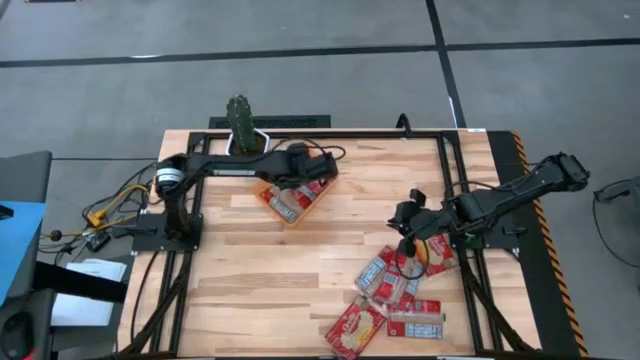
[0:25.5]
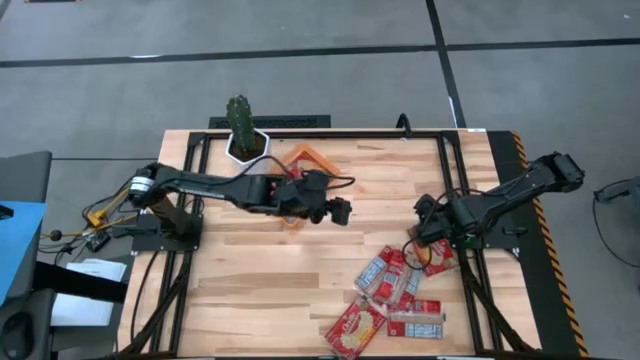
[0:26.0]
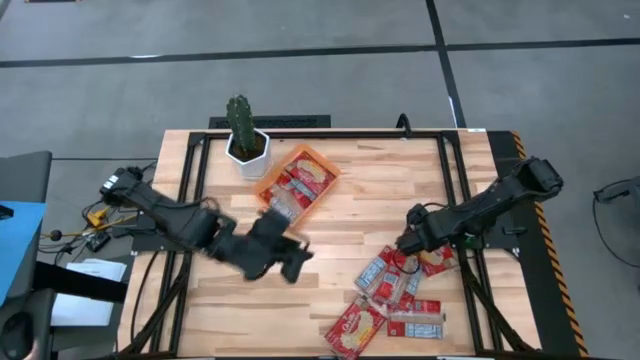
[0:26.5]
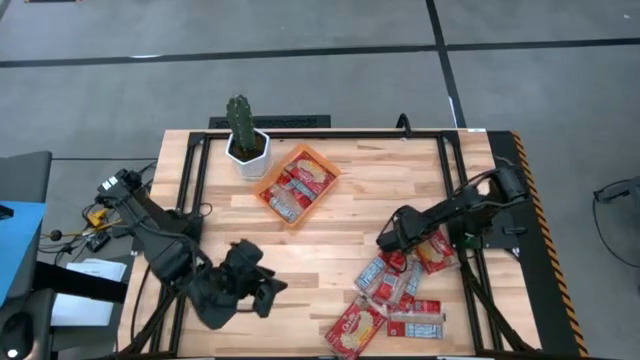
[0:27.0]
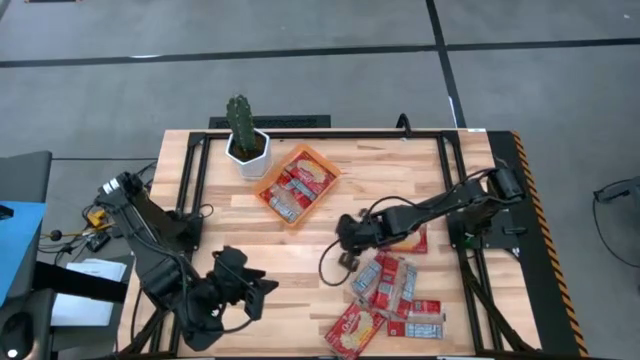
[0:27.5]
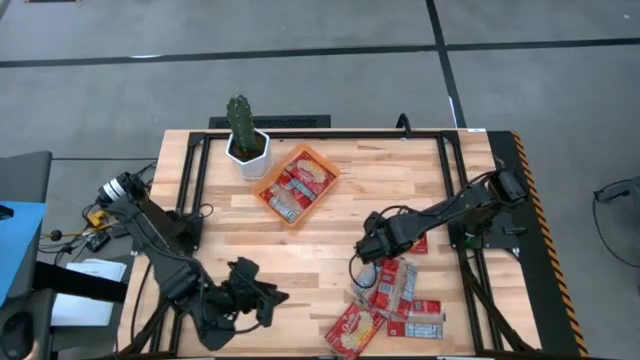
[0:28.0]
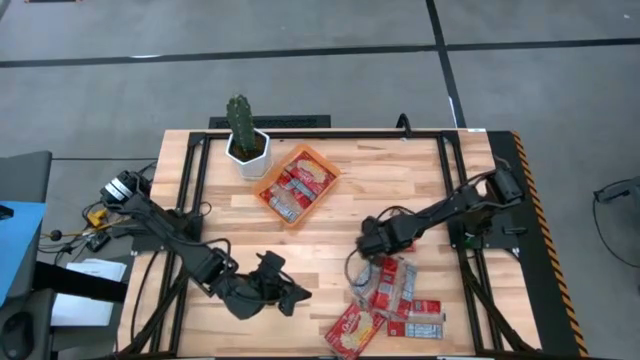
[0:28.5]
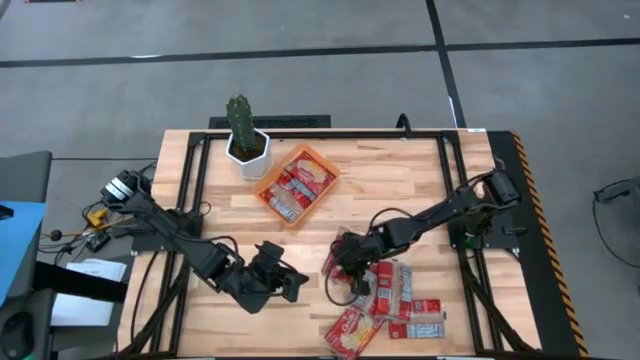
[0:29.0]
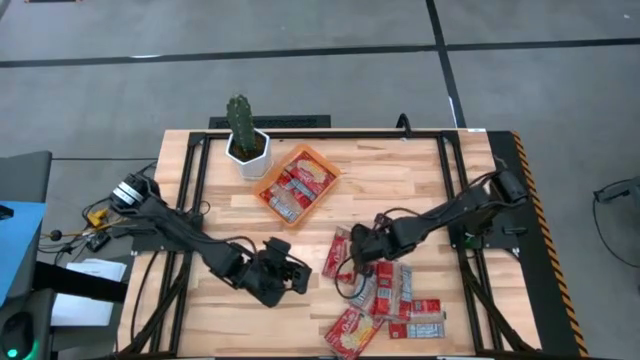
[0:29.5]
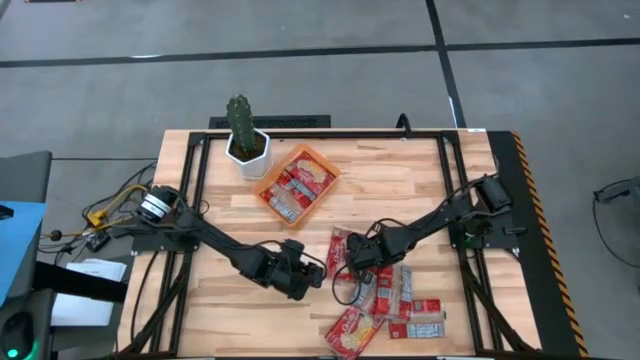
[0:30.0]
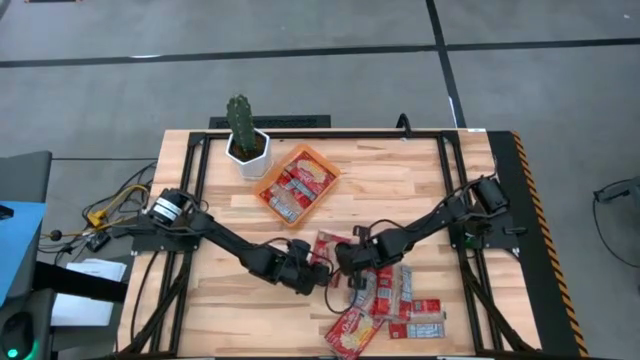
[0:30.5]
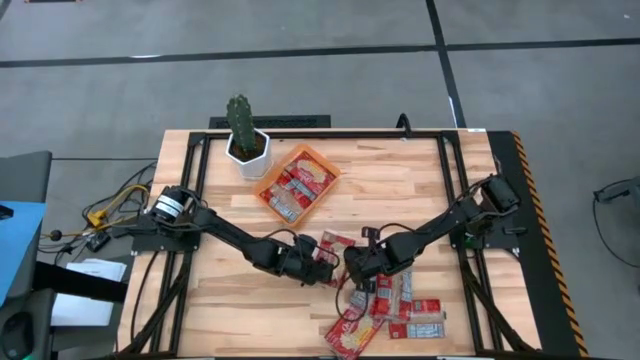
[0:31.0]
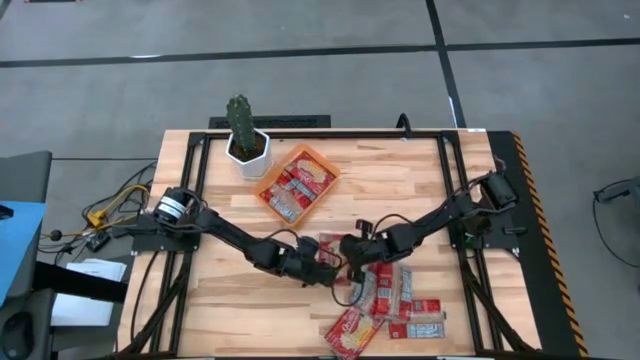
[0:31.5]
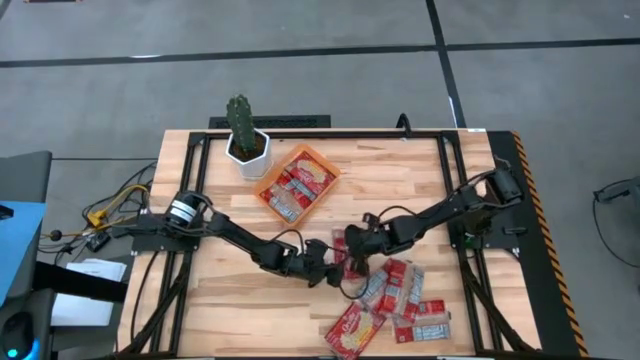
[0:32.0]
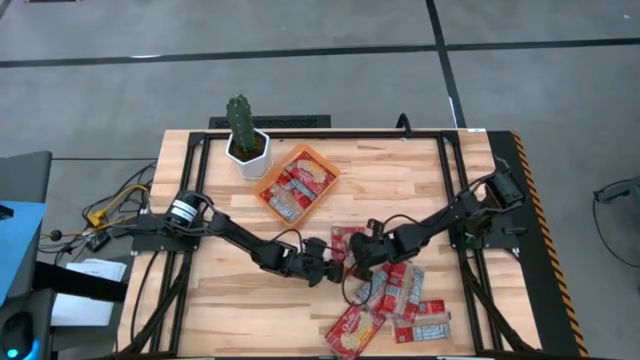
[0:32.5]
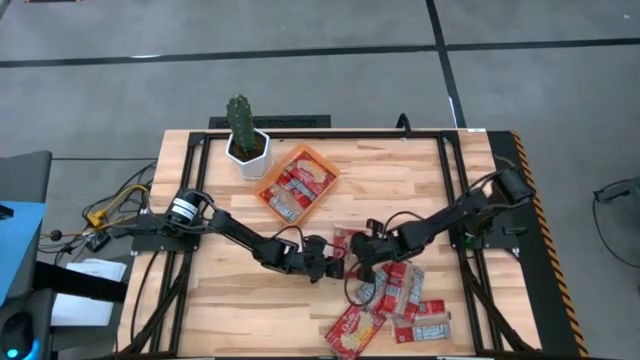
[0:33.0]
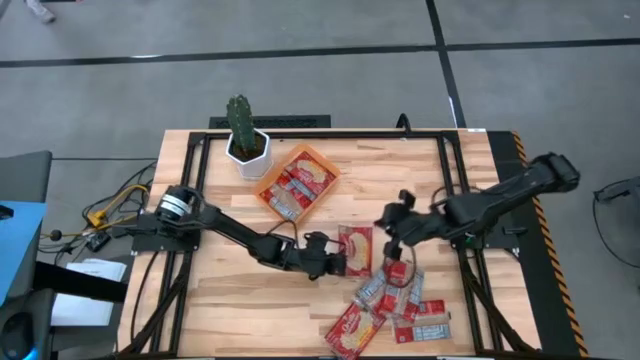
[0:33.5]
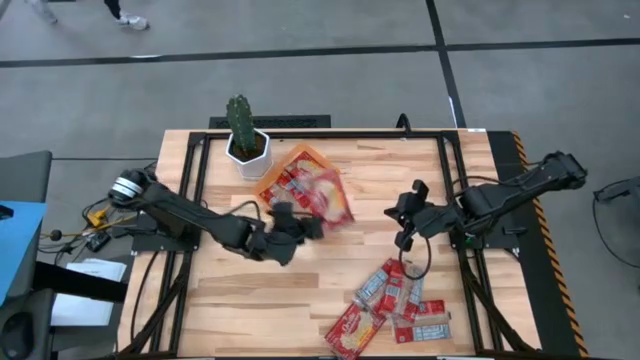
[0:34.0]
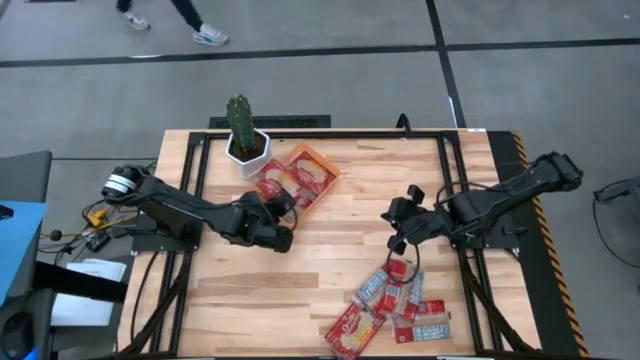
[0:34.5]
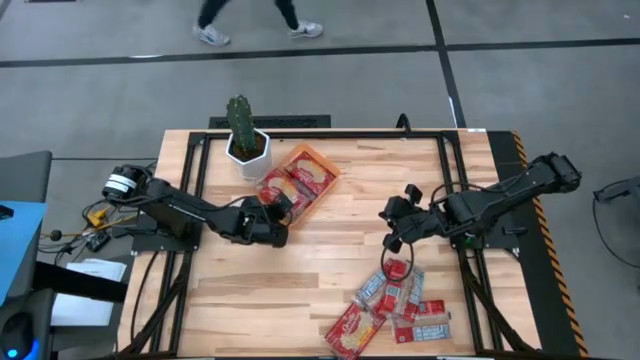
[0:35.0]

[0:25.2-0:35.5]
Task: Sort popcorn bags into baskets
Put the popcorn bag into the orange bin

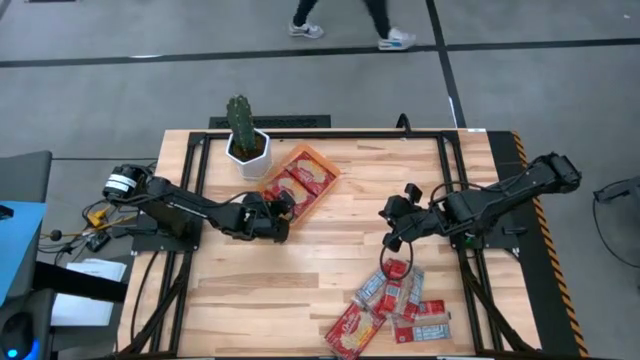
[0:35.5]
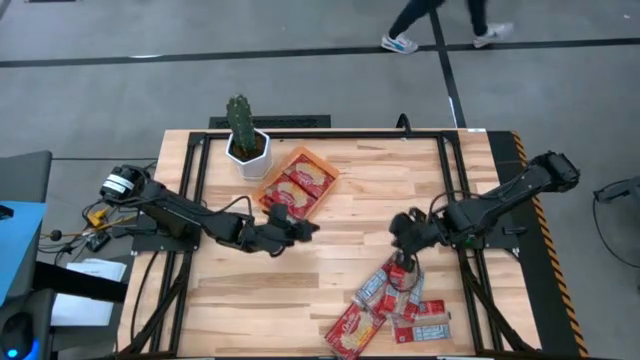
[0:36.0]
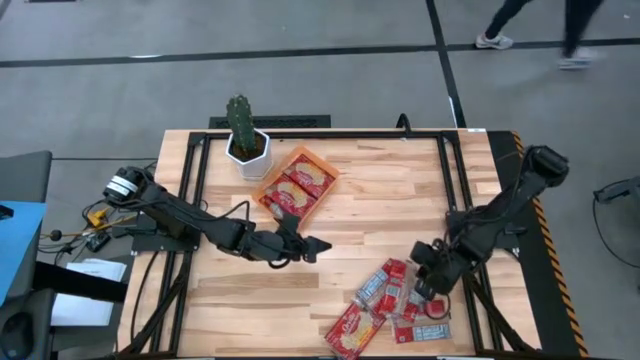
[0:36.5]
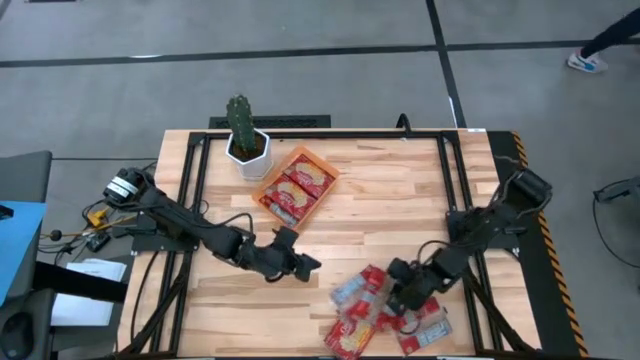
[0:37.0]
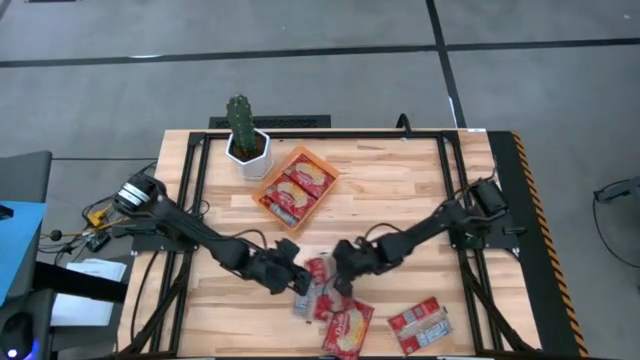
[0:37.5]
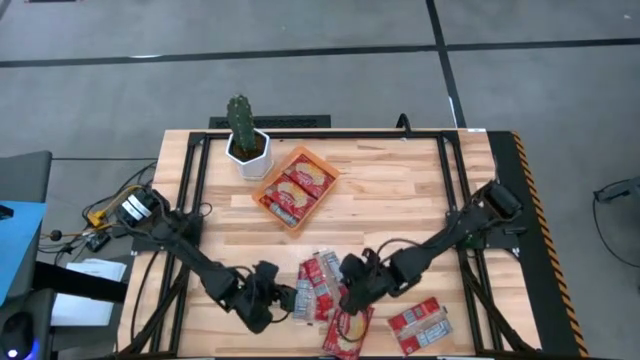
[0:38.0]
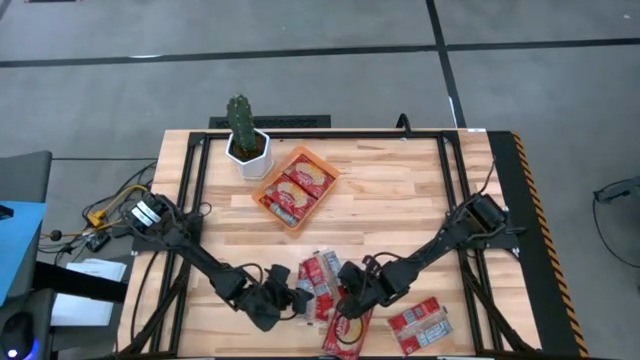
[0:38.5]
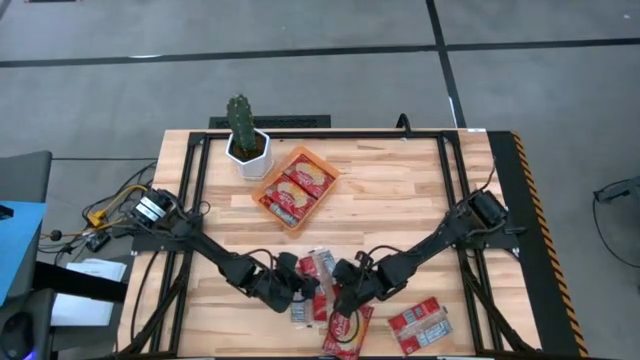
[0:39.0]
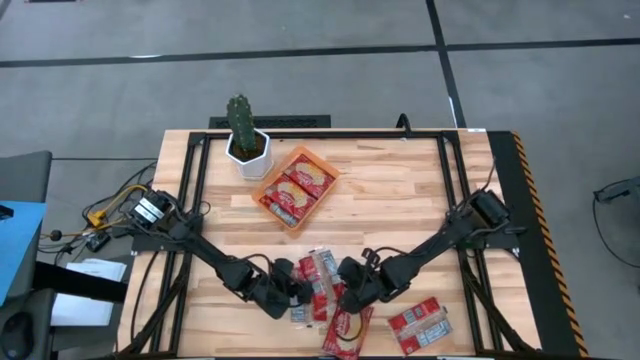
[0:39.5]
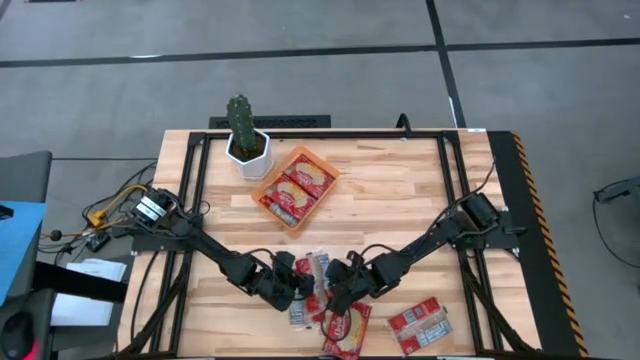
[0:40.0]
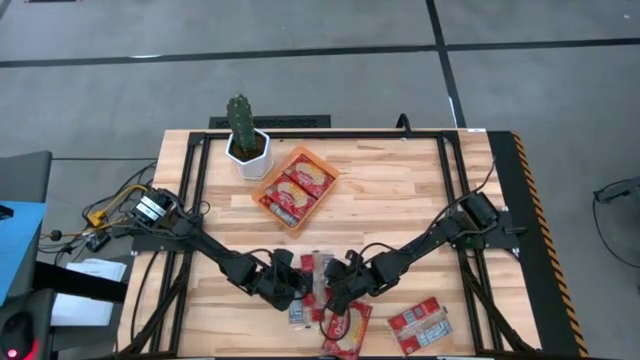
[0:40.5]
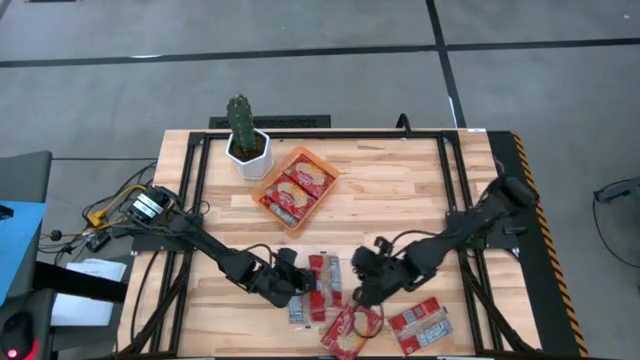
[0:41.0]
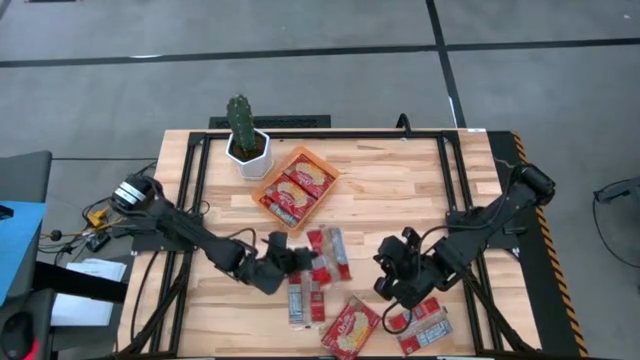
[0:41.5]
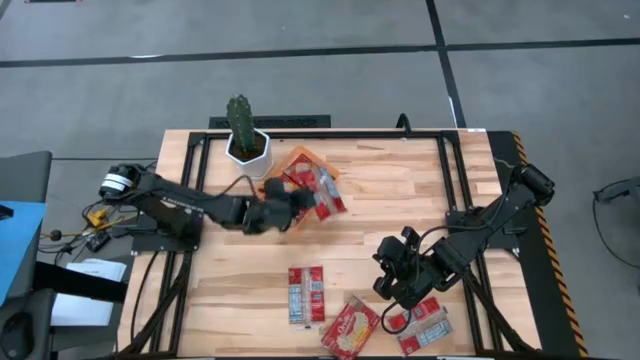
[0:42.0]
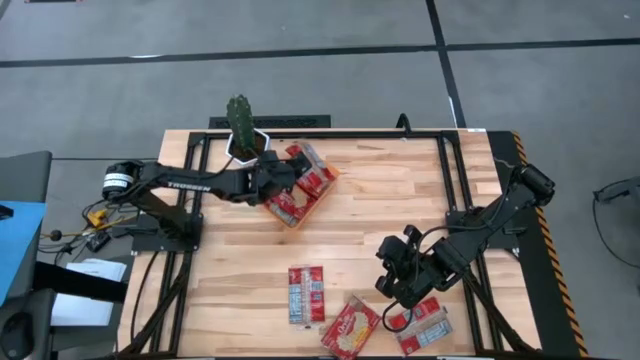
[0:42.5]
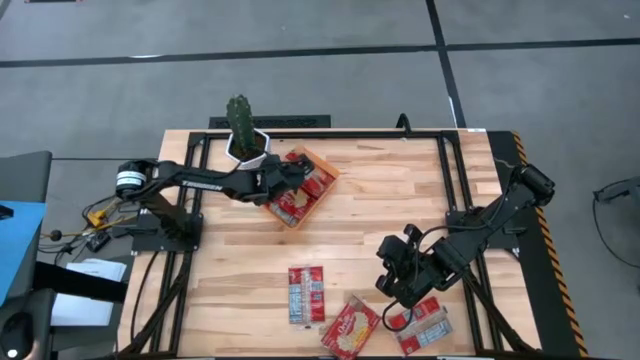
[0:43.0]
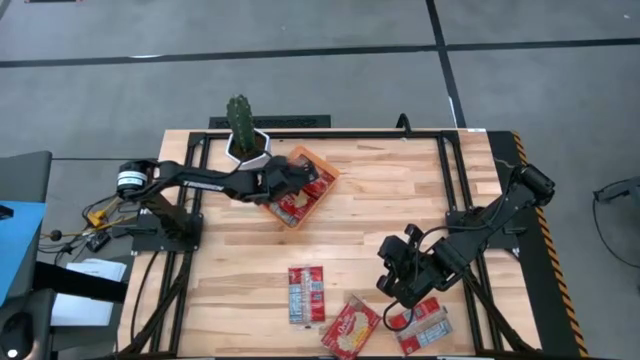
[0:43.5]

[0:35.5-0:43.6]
Put the popcorn bag into the orange bin

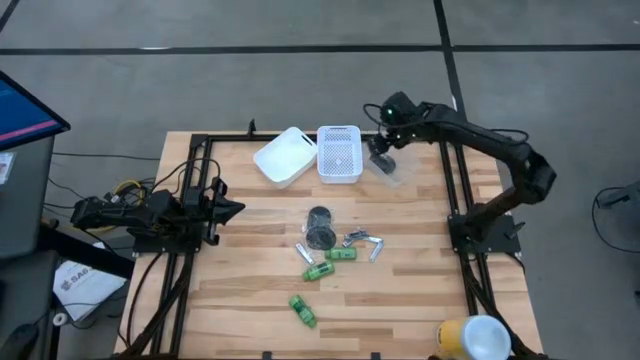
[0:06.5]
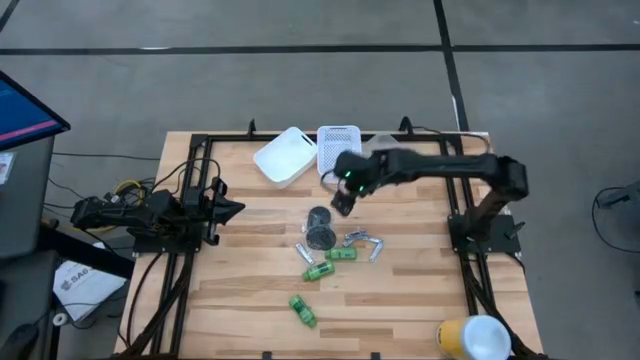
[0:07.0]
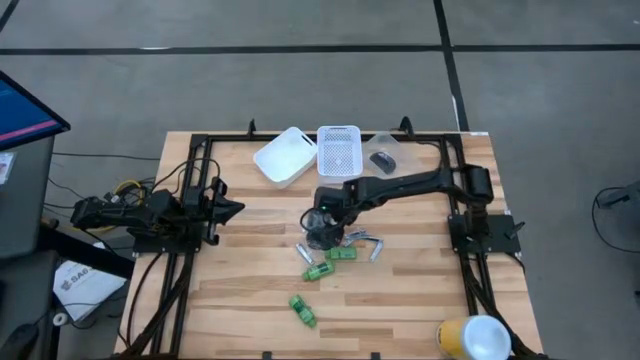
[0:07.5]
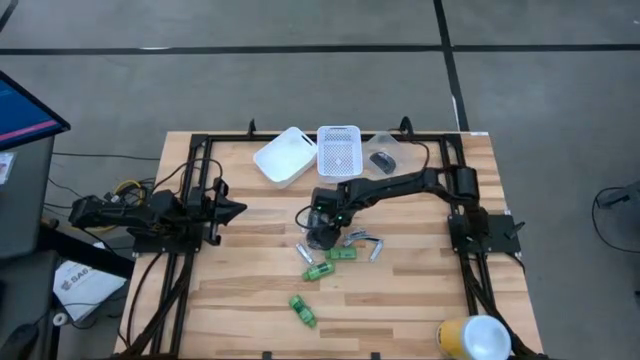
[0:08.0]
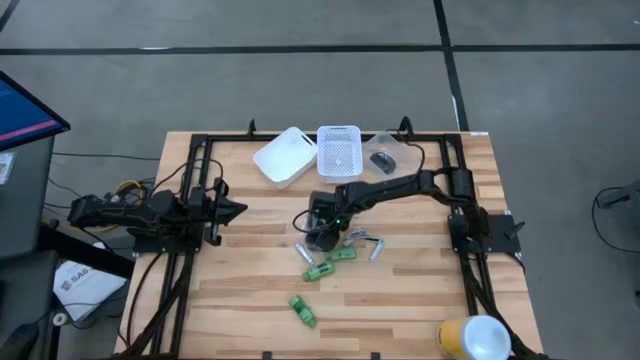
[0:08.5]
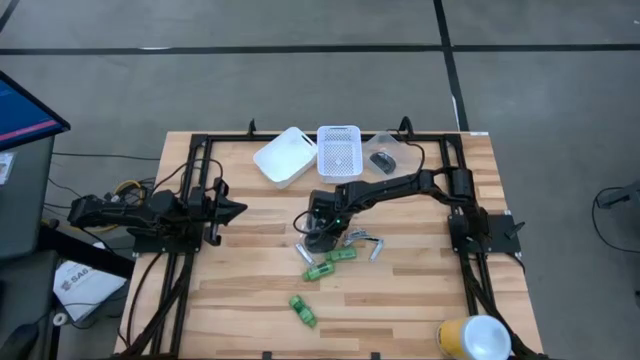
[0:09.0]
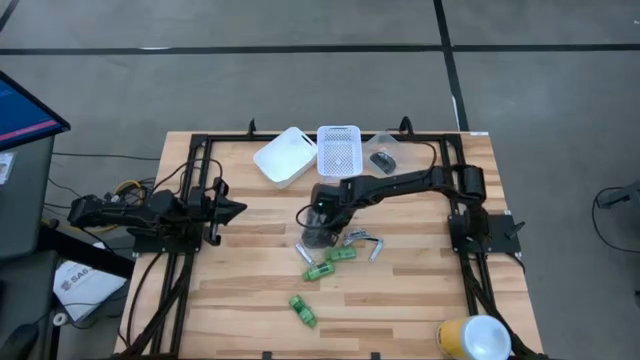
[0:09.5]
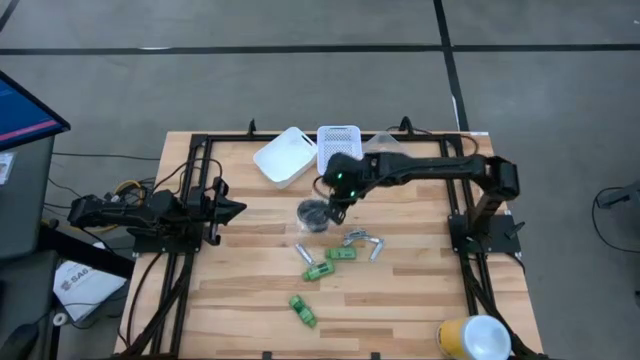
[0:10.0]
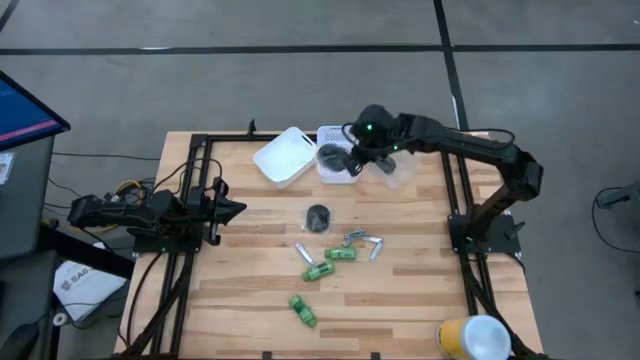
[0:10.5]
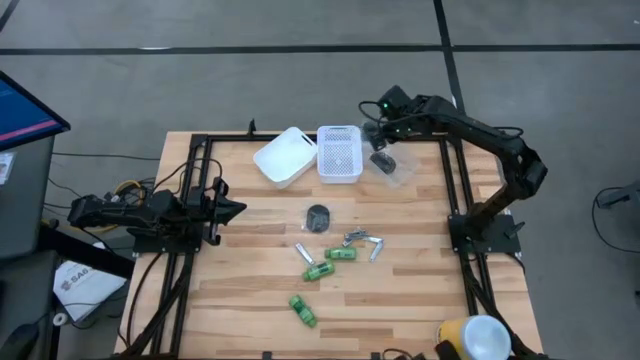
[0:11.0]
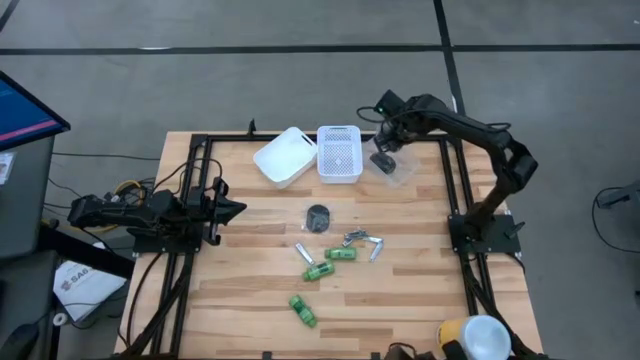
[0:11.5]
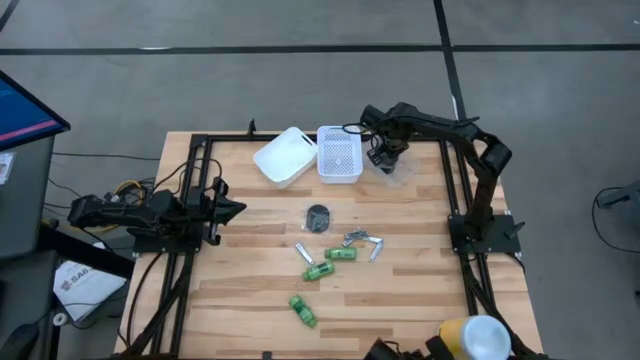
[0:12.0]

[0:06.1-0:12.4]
Task: Pick & Place Travel size toiletries
Put the black hairbrush into the transparent bin
